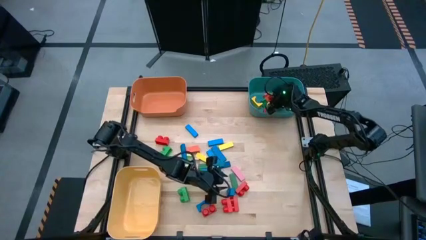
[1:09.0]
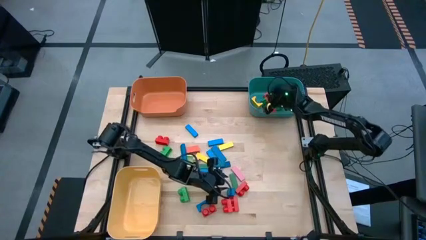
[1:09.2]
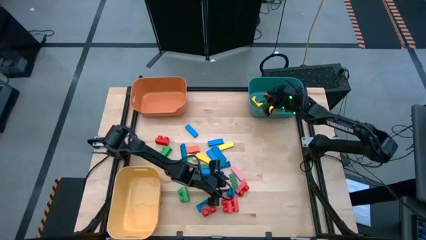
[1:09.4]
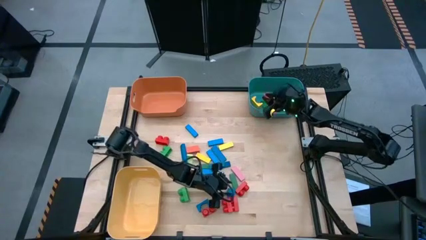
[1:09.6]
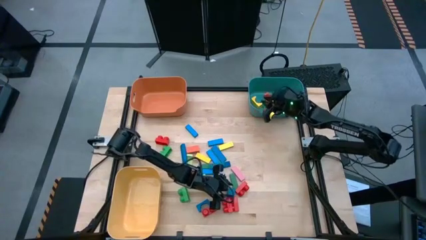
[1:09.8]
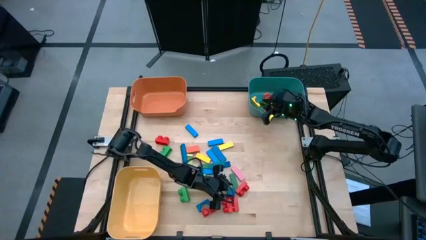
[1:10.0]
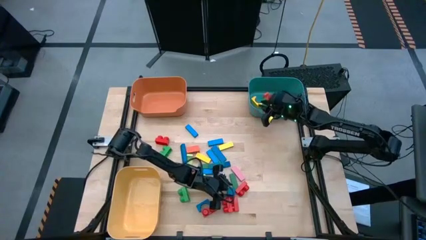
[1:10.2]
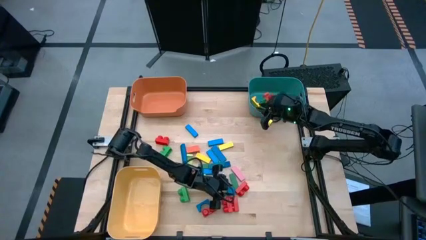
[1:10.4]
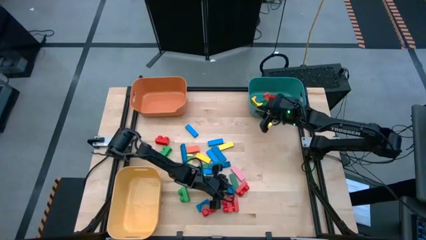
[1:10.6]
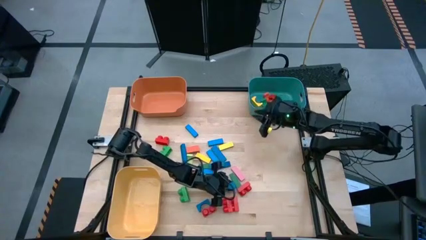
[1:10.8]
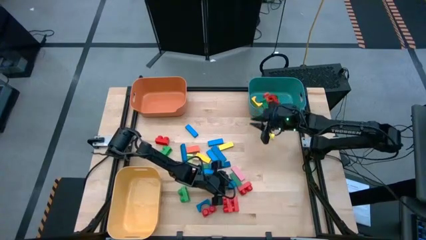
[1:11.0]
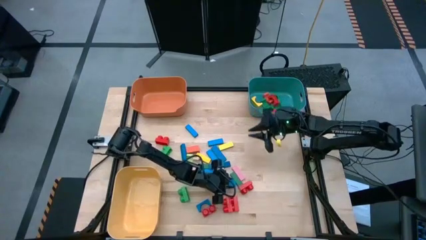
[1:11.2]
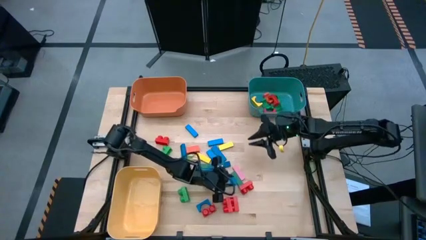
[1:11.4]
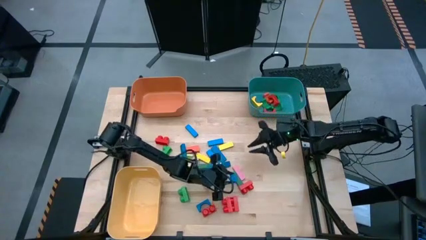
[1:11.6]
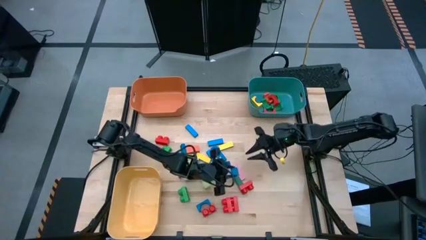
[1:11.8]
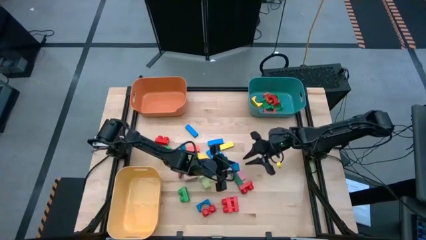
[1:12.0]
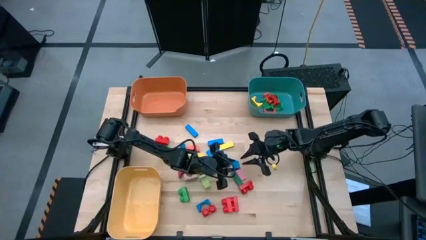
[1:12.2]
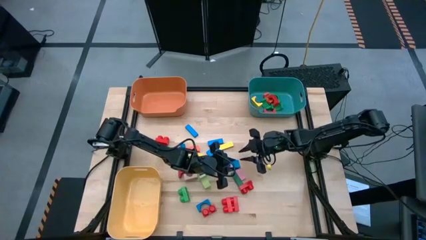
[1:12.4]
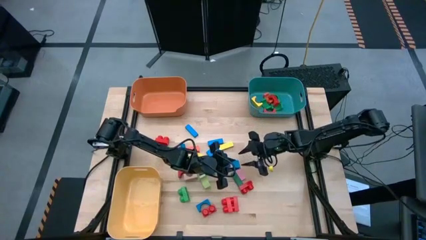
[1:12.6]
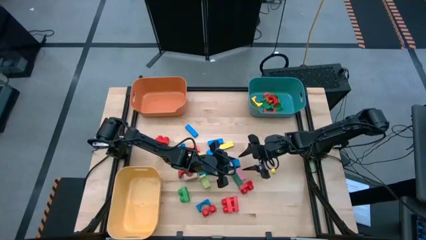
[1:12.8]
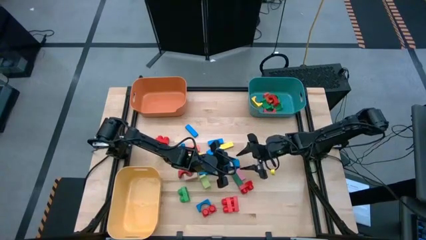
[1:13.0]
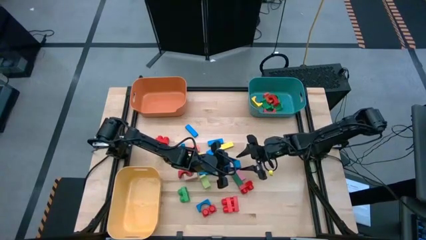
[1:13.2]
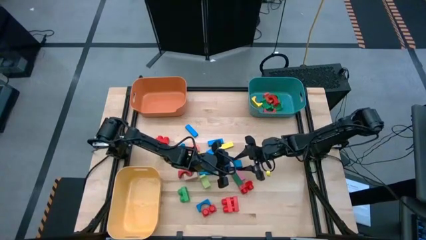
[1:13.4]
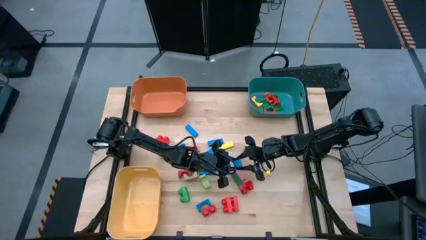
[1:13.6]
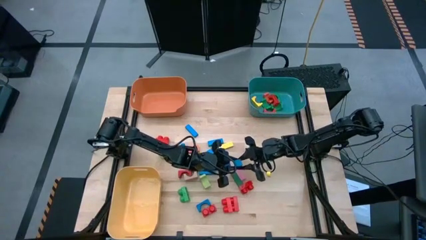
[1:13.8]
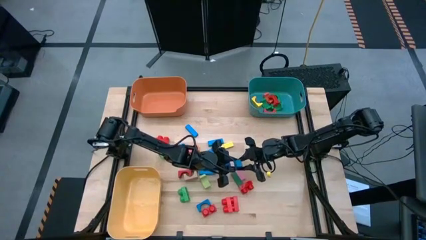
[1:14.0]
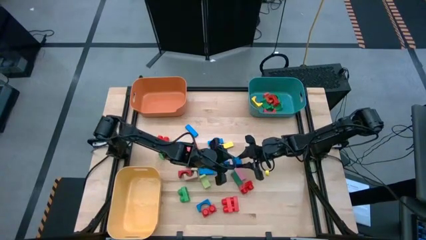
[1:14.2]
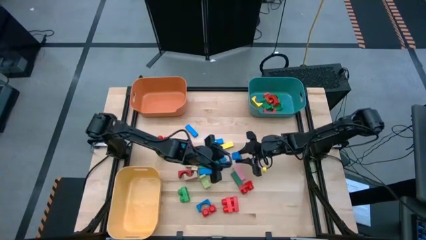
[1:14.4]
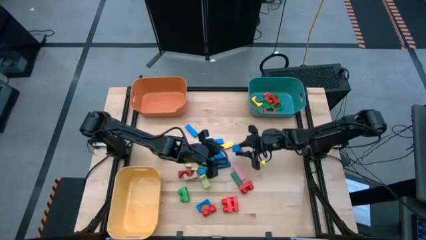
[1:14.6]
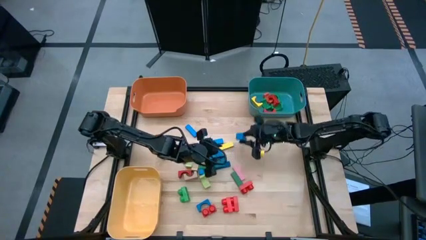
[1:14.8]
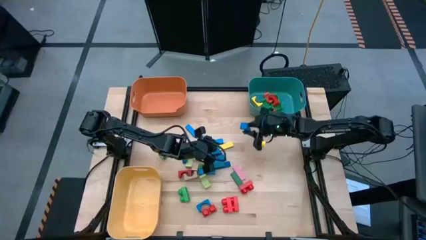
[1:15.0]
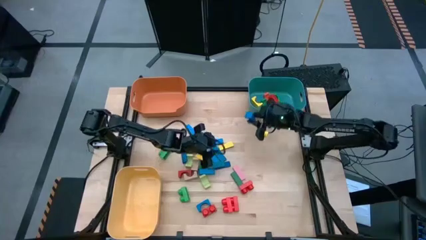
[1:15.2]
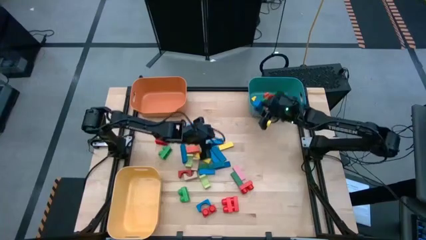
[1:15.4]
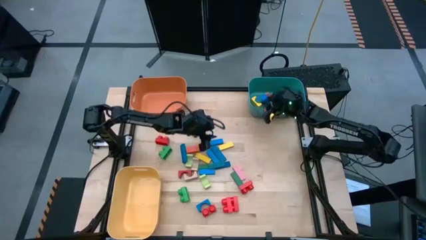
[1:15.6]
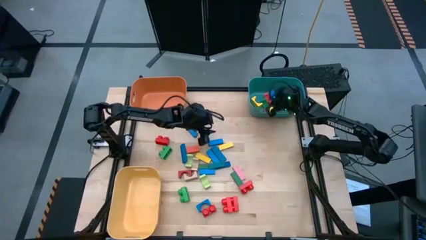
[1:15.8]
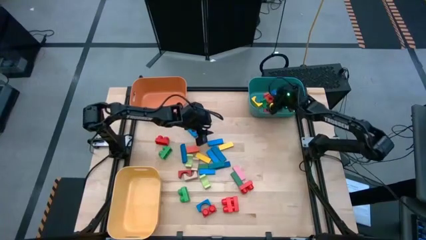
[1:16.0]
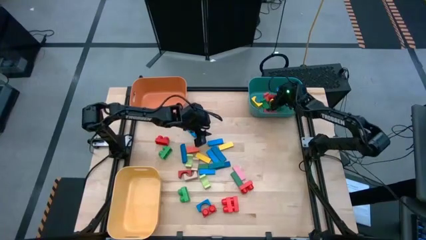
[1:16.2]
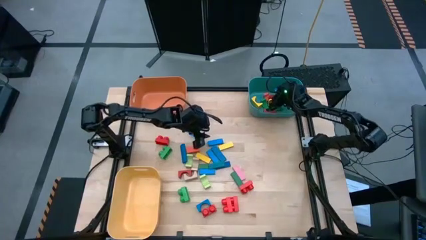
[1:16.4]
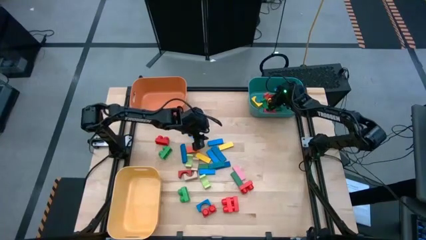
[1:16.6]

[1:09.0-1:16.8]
Task: Sort blocks by size
Put the blue arch block into the blue bin

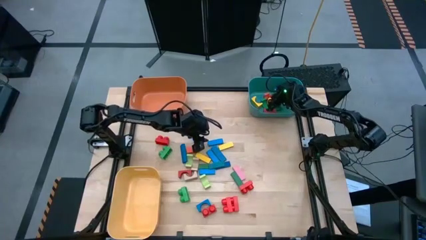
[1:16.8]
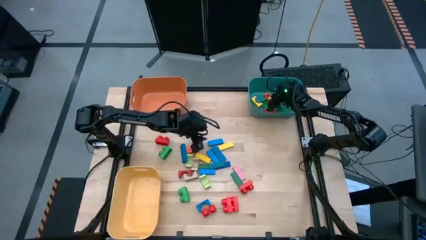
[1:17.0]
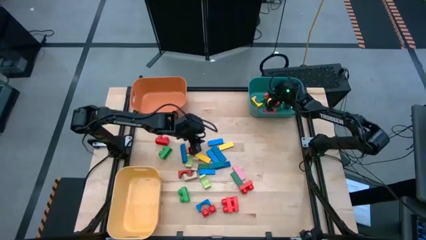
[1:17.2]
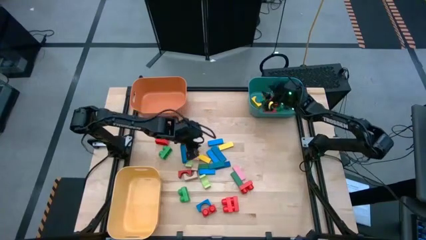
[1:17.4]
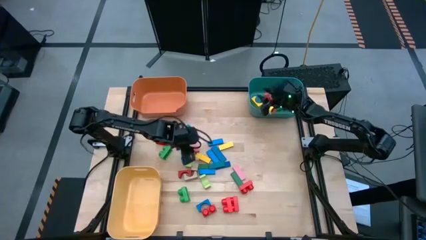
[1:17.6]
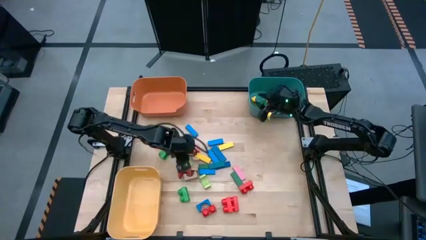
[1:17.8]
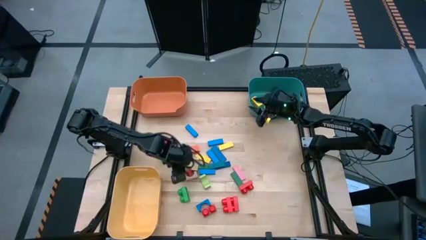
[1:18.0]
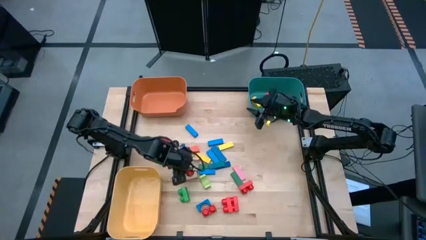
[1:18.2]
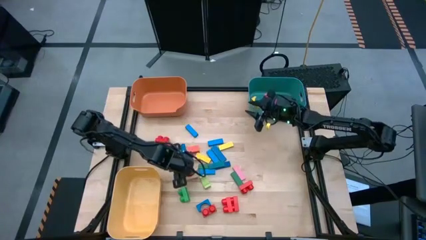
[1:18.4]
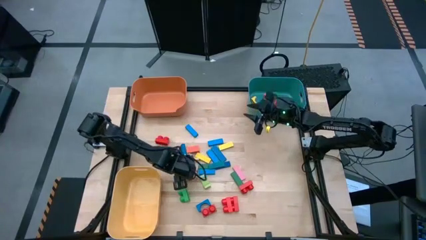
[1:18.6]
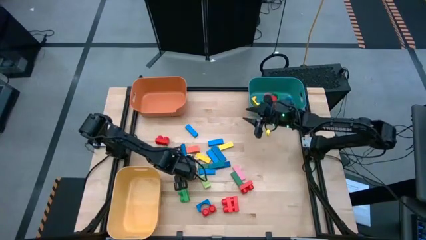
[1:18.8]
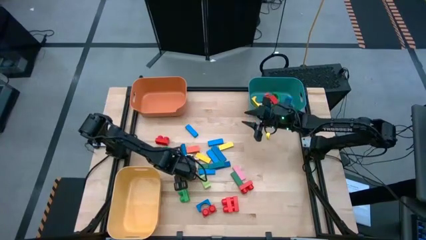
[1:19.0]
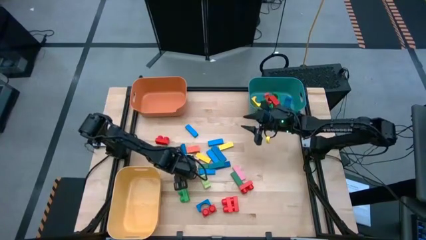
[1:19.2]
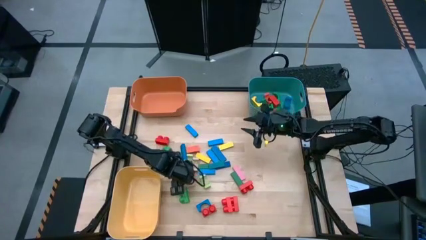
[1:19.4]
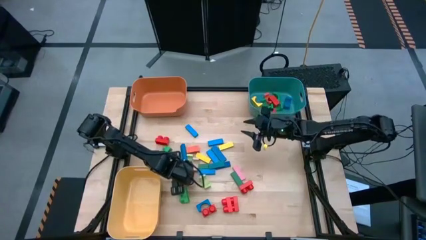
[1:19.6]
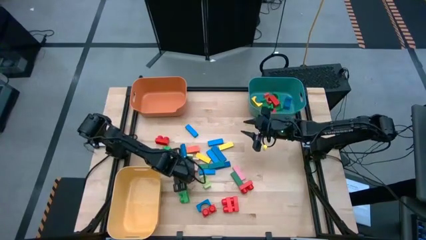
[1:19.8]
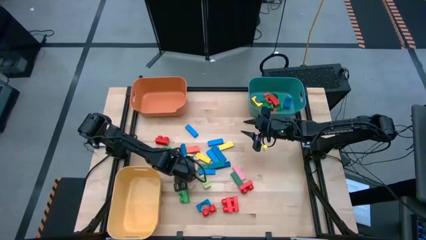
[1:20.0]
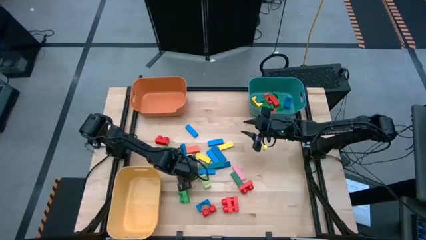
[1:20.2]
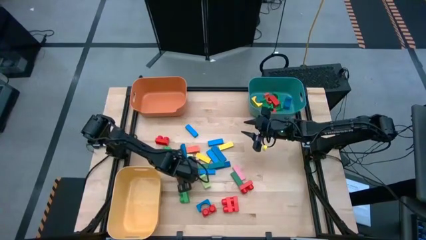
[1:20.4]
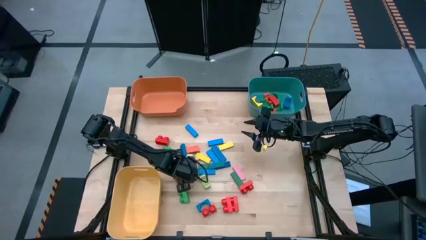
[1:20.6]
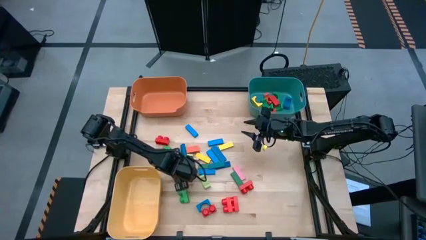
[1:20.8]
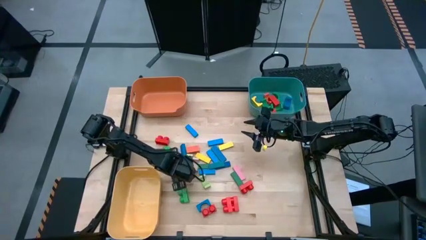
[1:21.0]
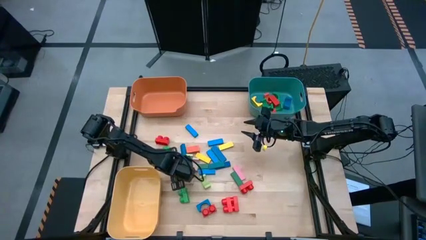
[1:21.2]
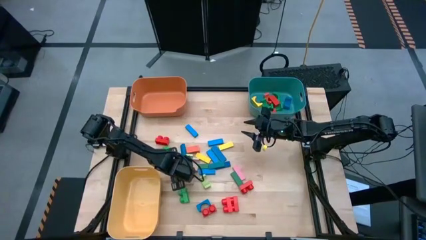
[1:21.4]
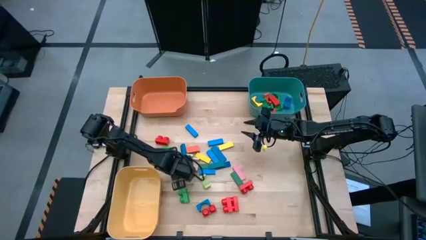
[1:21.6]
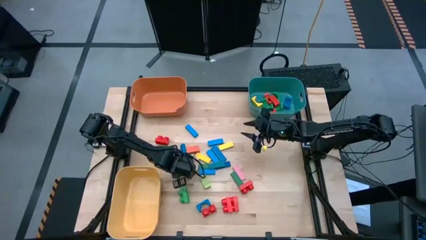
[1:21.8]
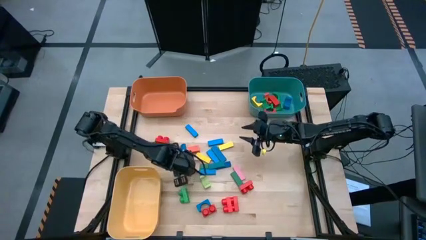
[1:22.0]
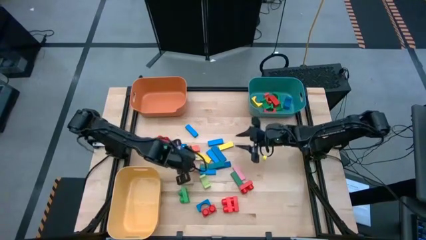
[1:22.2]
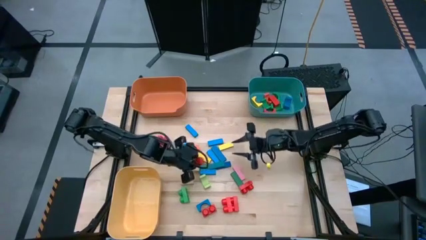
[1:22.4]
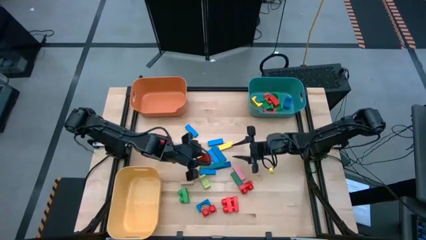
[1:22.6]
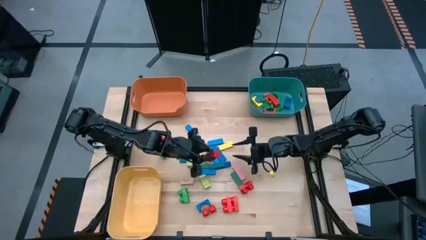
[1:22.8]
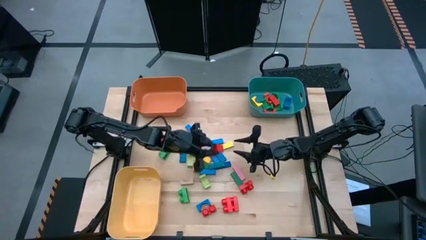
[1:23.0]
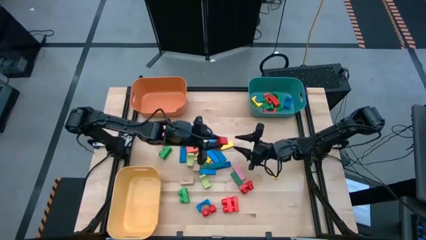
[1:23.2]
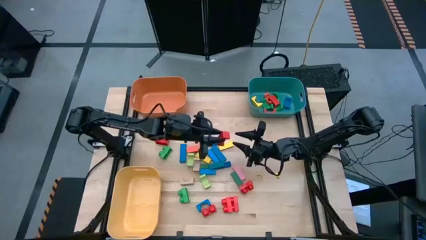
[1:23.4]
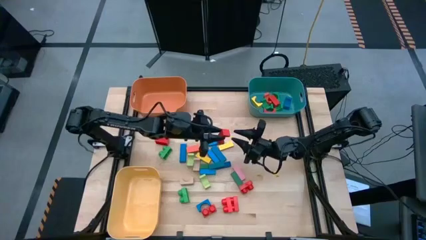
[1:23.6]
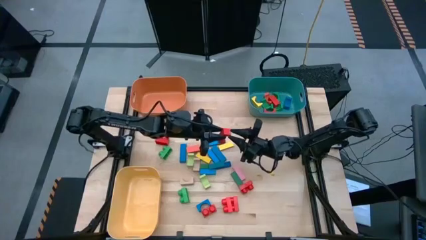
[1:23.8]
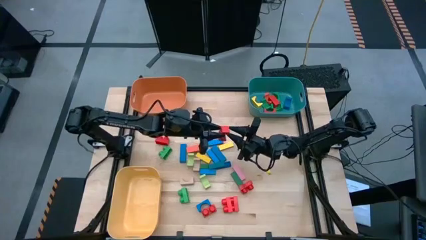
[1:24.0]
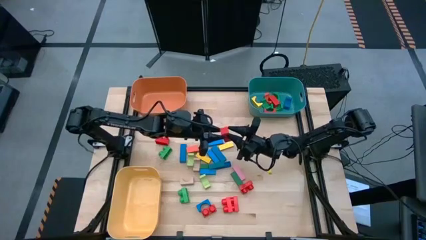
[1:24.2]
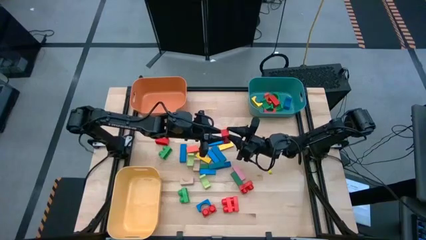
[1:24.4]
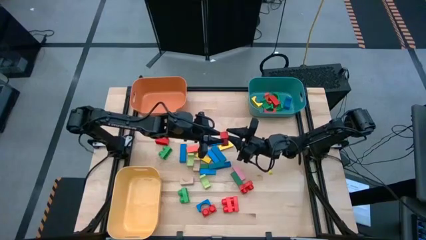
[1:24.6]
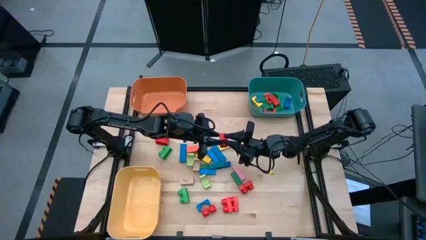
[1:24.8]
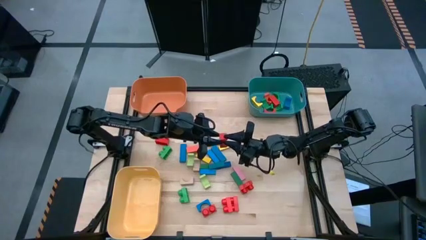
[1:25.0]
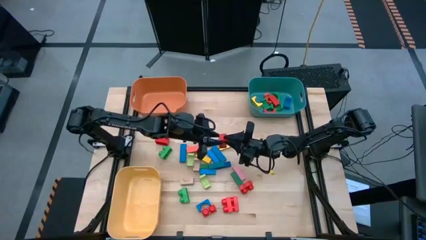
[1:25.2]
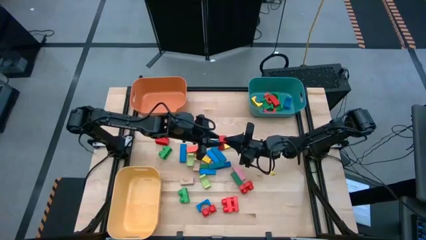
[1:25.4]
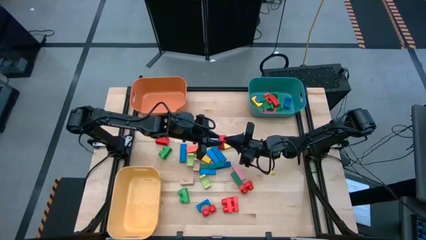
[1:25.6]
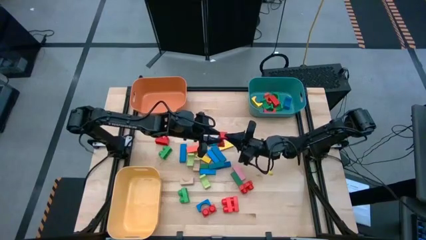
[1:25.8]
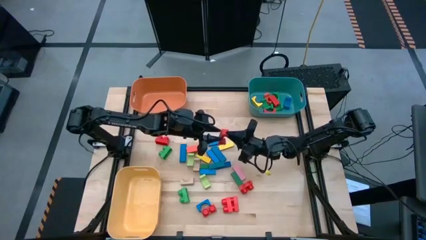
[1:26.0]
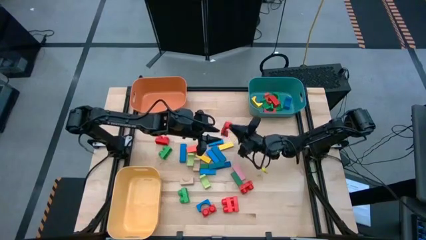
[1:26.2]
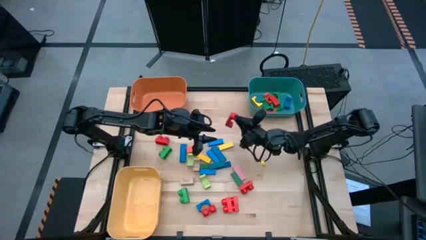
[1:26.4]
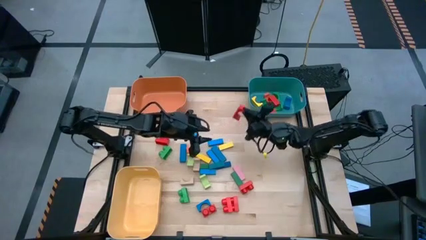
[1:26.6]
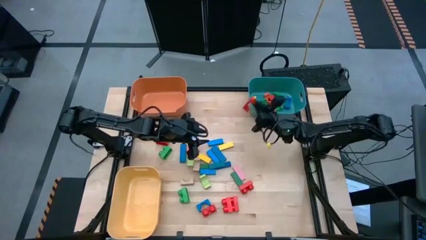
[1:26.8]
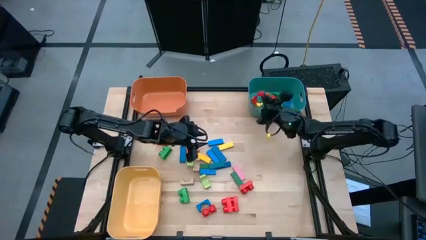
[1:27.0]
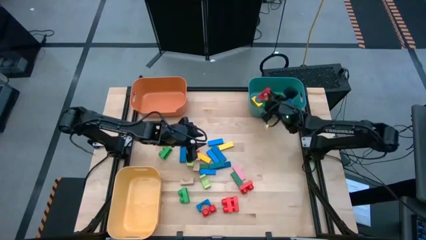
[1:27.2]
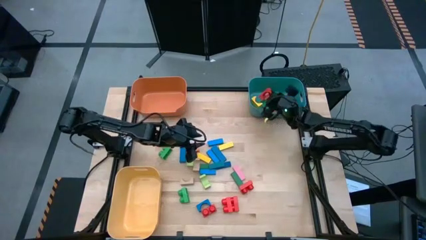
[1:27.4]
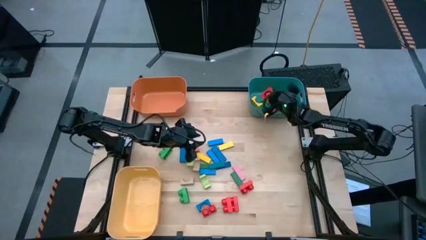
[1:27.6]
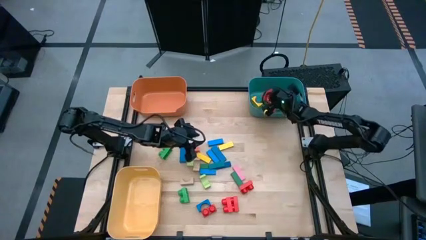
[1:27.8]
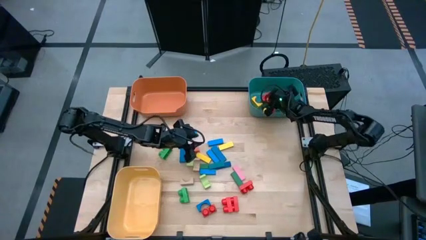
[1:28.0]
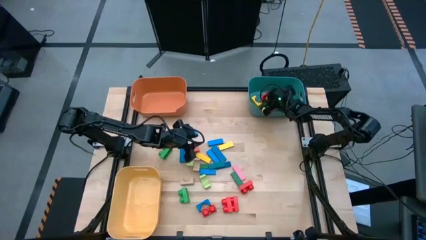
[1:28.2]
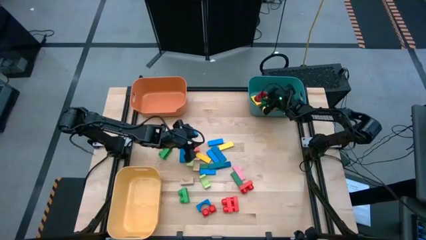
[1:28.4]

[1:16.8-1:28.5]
Put the red arch block into the blue bin
